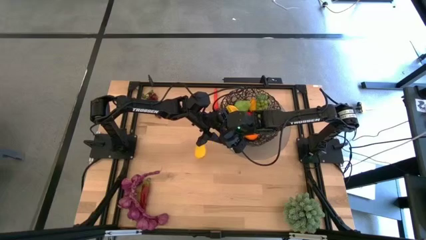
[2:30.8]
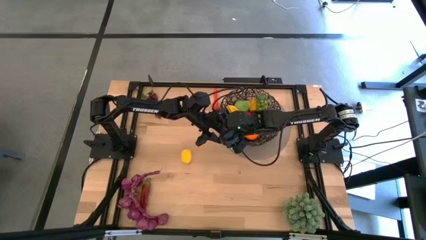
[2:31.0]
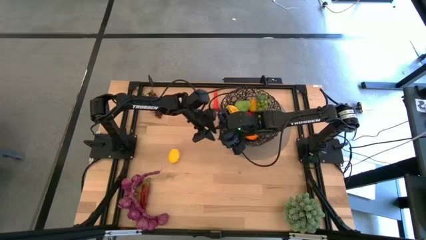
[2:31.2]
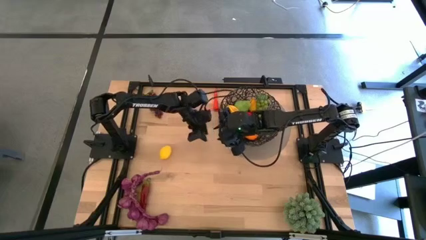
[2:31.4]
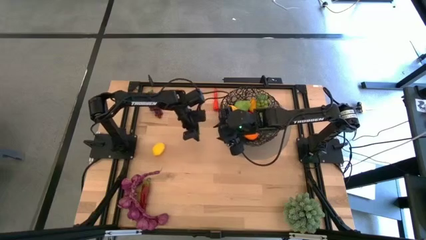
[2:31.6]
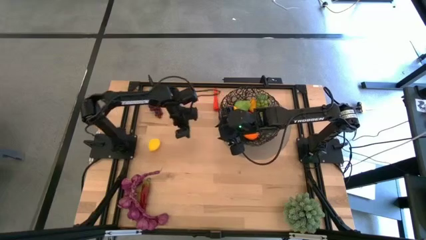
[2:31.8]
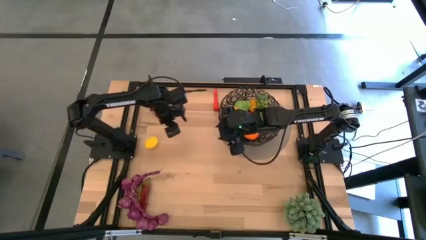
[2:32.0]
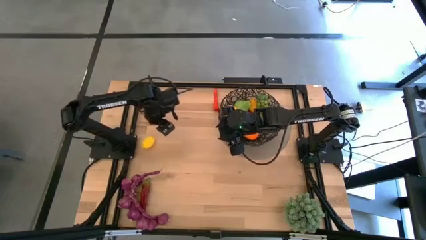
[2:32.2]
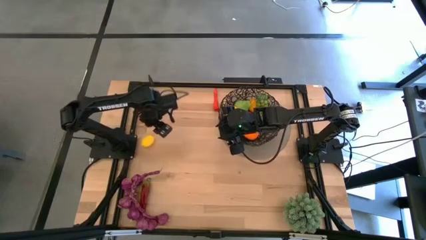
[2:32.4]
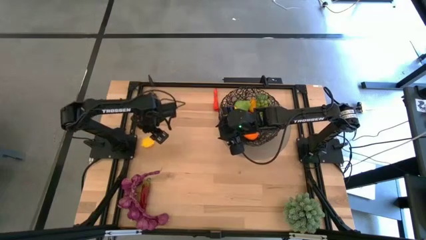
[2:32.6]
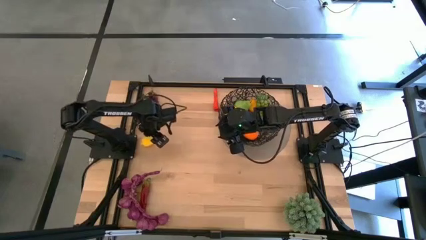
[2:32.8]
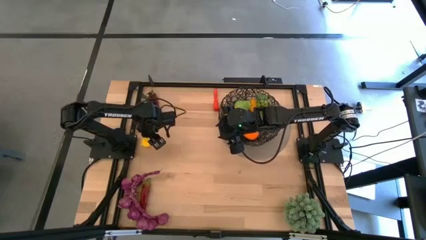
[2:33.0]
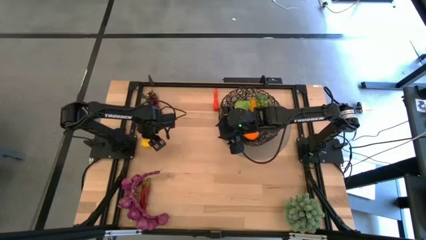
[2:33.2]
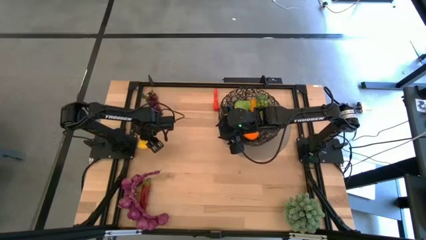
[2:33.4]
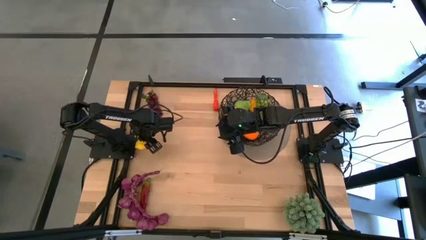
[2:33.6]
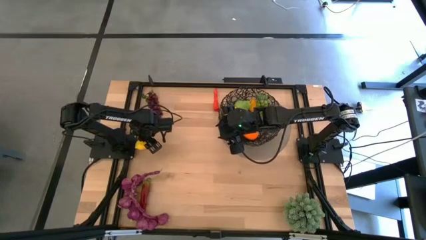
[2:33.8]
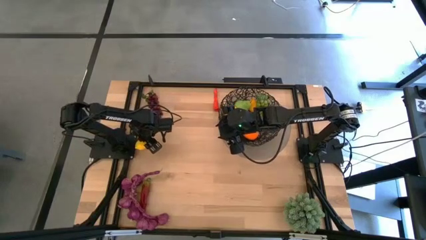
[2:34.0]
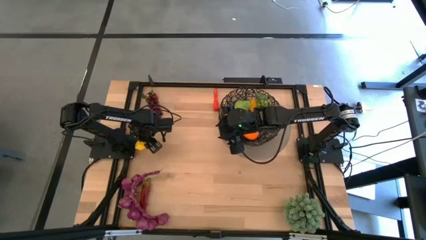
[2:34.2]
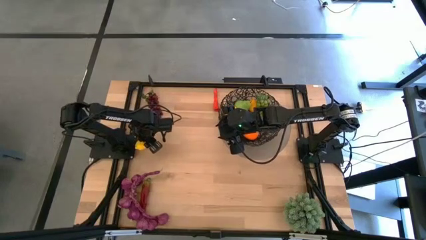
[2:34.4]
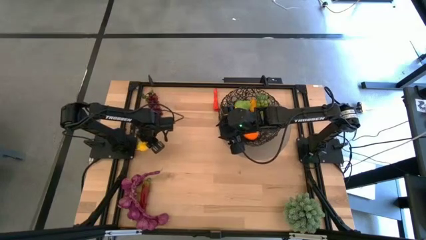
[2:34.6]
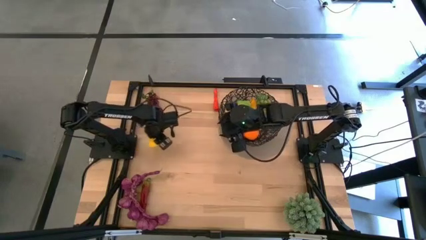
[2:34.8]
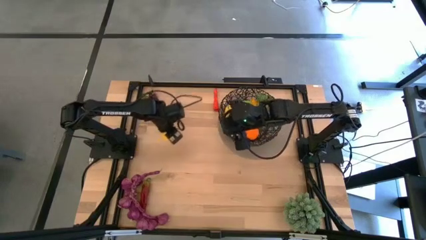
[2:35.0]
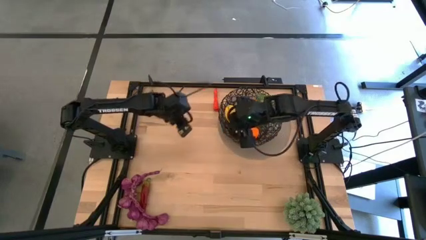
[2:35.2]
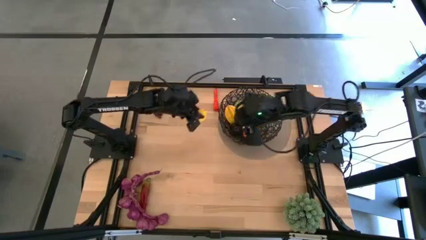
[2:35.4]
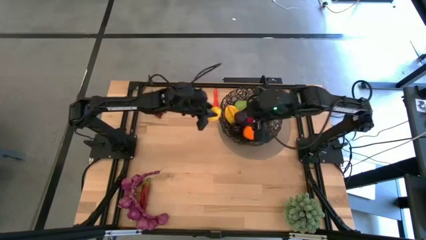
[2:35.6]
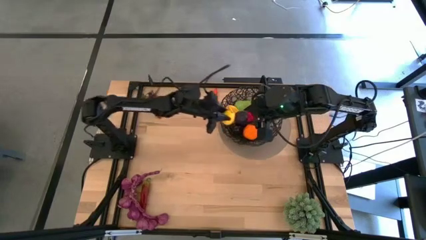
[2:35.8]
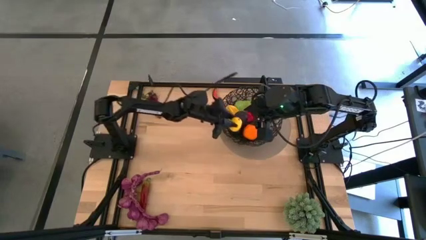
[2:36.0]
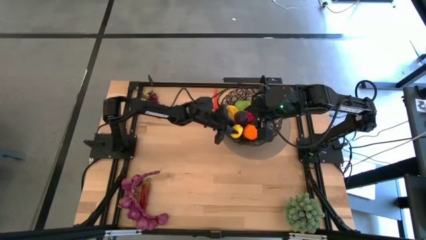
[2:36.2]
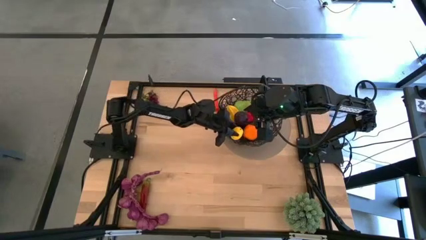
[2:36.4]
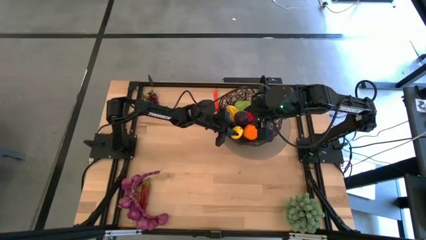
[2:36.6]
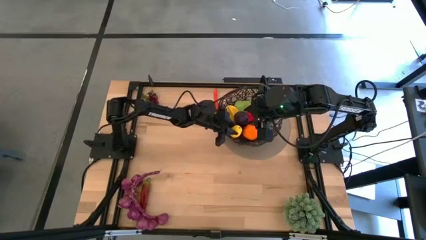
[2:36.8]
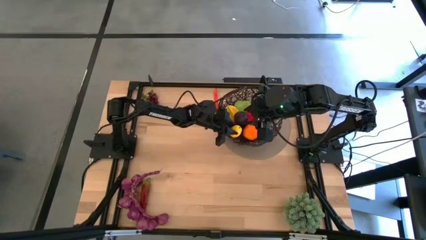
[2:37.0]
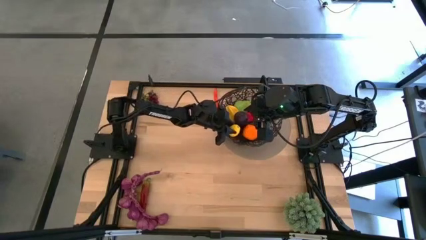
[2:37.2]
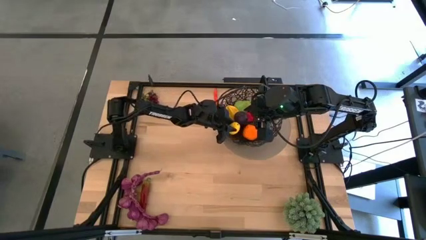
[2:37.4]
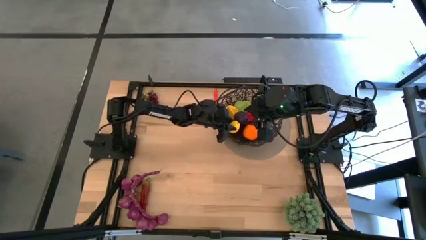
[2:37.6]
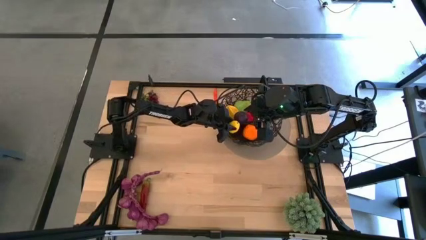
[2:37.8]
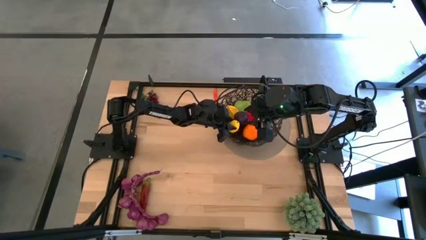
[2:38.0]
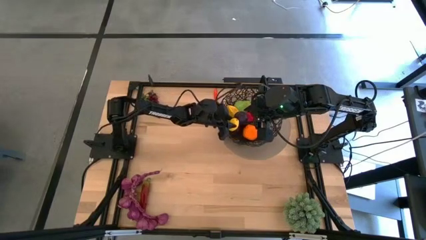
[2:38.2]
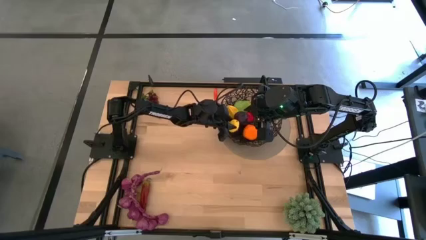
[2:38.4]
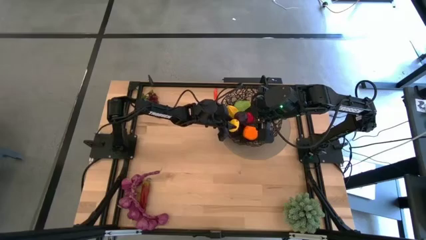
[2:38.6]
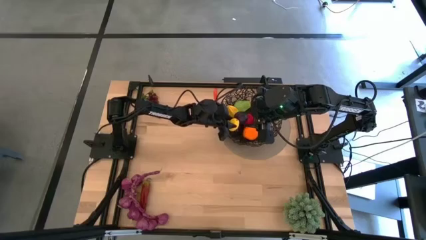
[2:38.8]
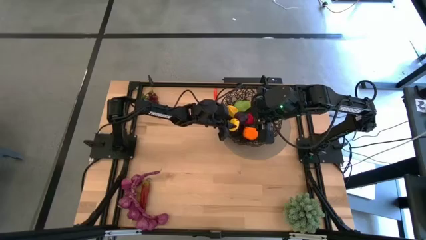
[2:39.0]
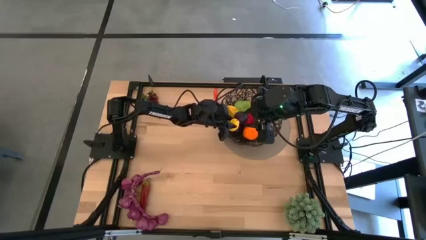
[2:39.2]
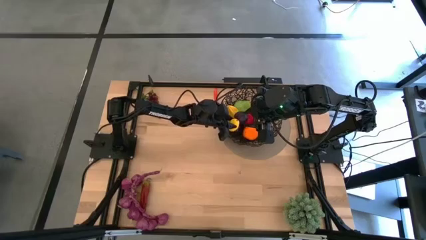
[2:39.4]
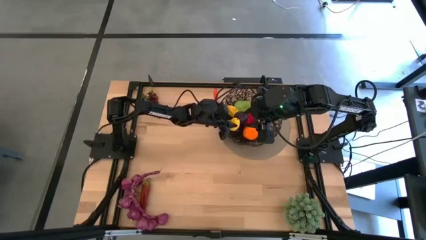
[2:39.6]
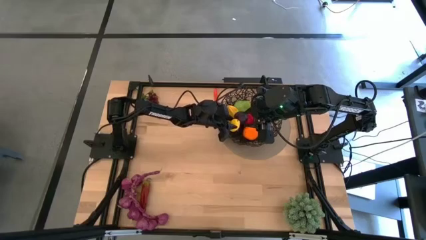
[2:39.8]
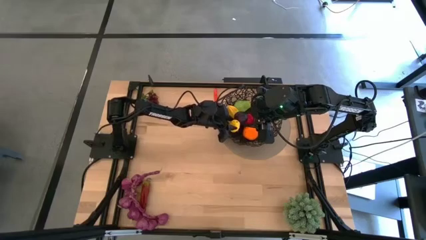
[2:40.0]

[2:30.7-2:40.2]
Task: Build produce basket
Put the lemon into the black wire basket

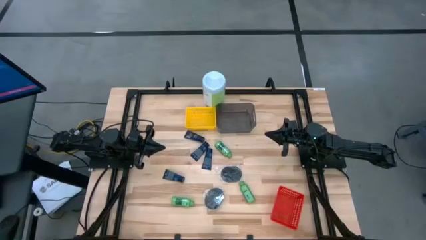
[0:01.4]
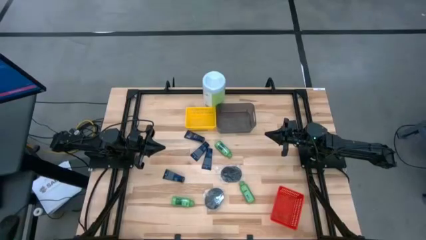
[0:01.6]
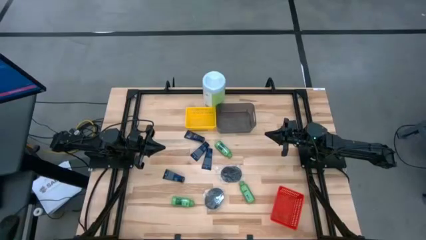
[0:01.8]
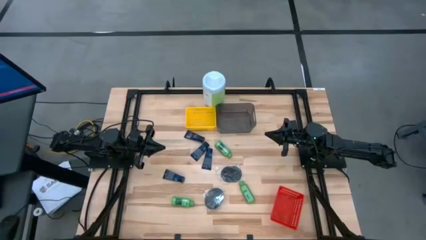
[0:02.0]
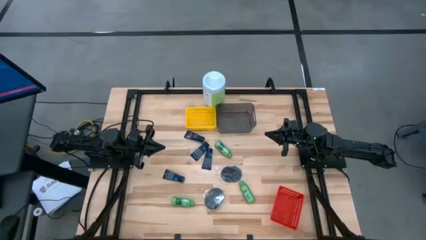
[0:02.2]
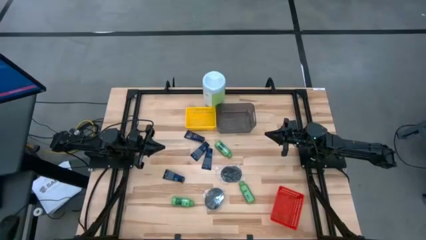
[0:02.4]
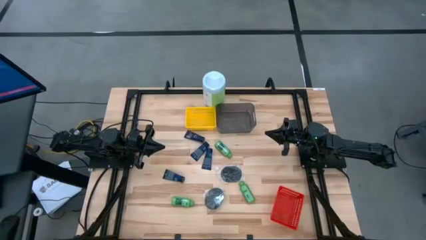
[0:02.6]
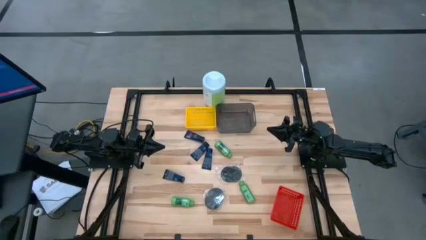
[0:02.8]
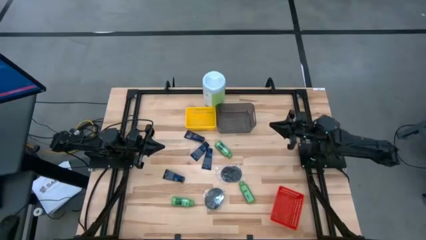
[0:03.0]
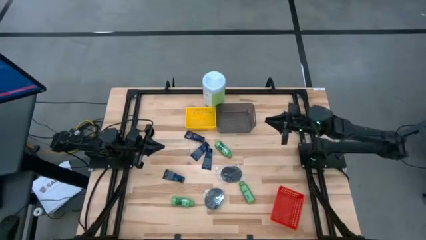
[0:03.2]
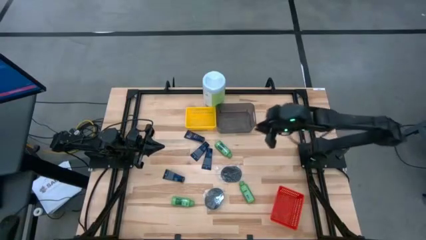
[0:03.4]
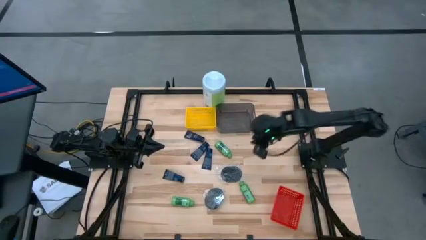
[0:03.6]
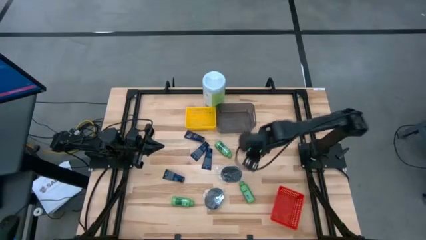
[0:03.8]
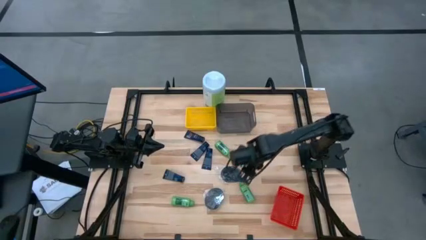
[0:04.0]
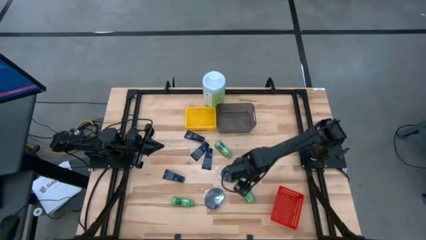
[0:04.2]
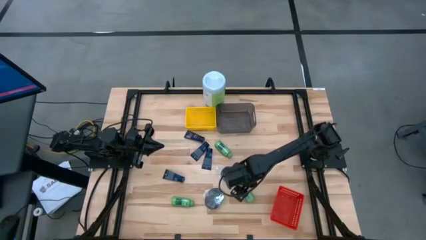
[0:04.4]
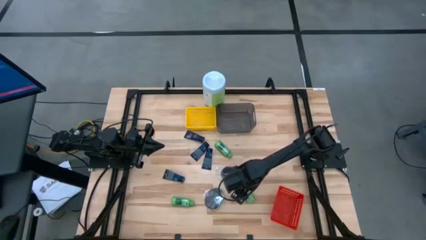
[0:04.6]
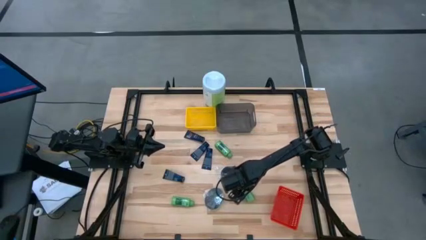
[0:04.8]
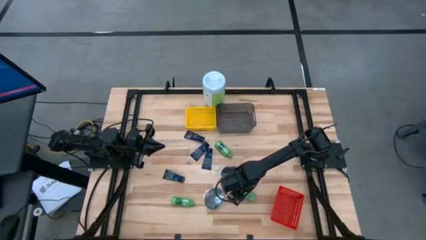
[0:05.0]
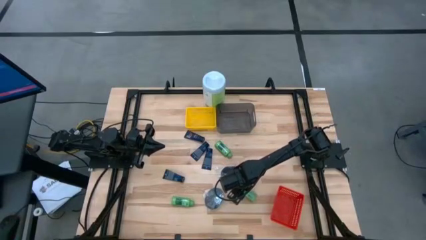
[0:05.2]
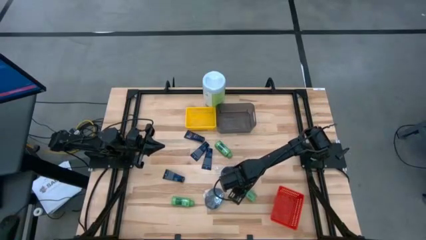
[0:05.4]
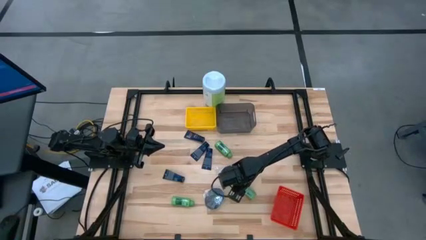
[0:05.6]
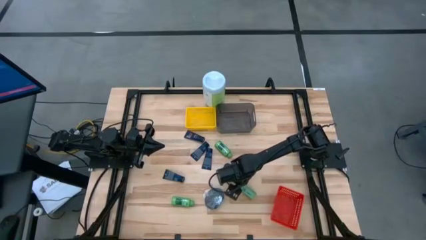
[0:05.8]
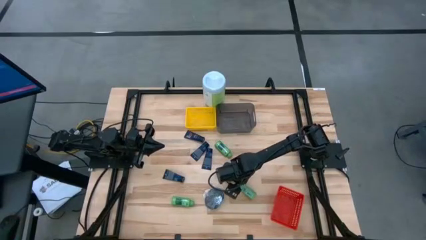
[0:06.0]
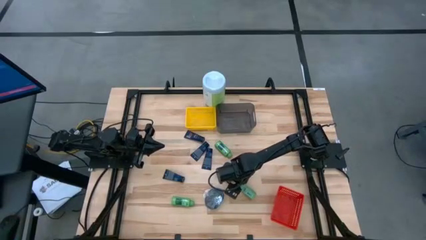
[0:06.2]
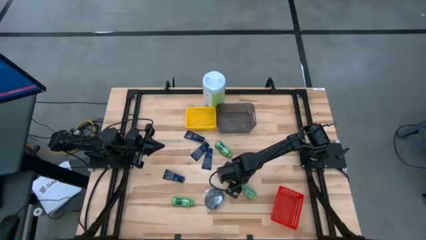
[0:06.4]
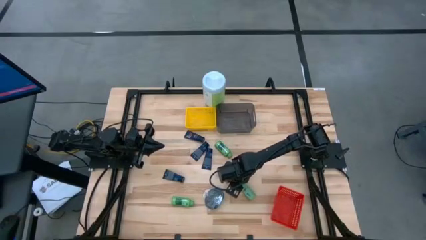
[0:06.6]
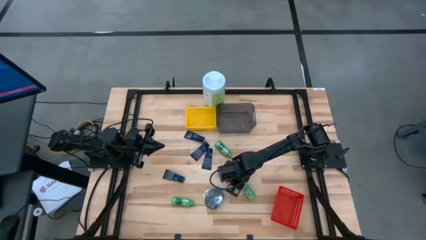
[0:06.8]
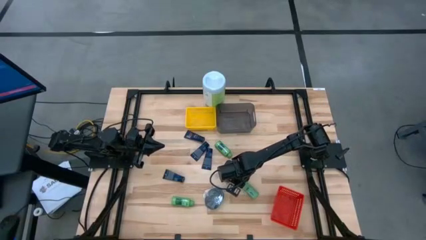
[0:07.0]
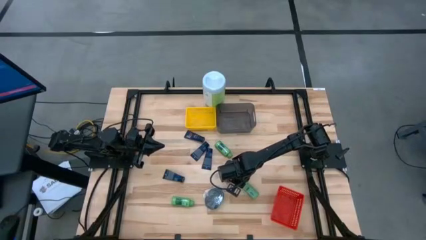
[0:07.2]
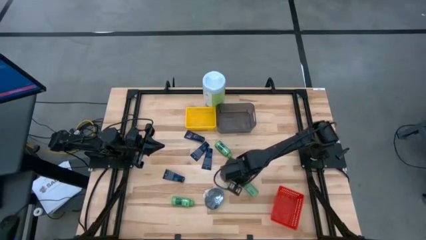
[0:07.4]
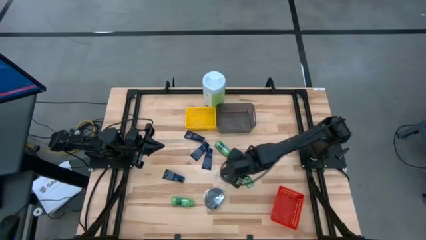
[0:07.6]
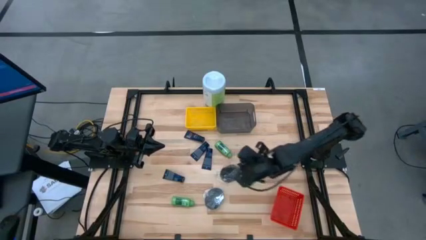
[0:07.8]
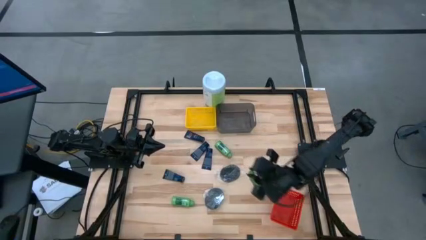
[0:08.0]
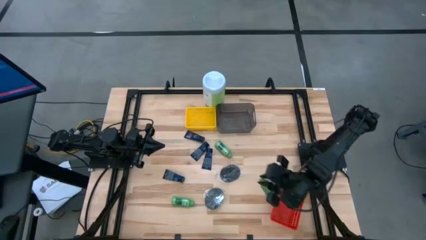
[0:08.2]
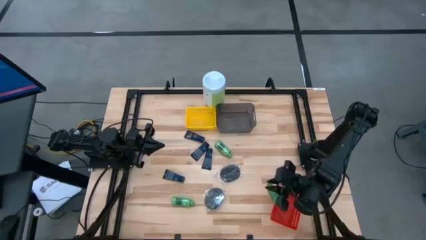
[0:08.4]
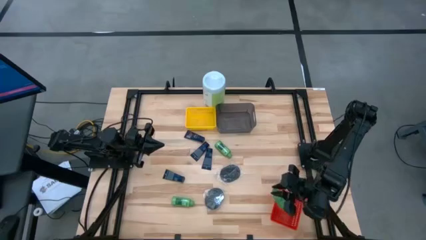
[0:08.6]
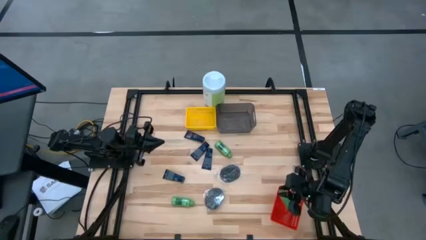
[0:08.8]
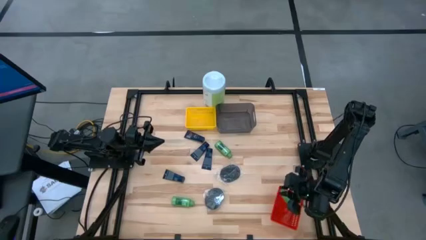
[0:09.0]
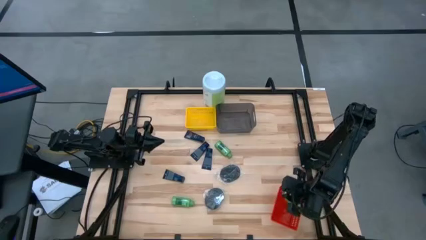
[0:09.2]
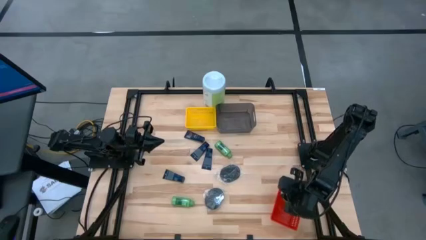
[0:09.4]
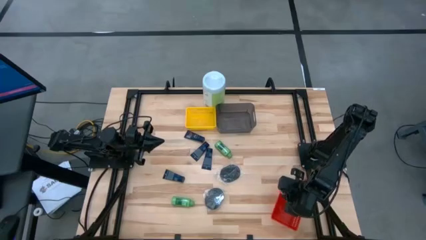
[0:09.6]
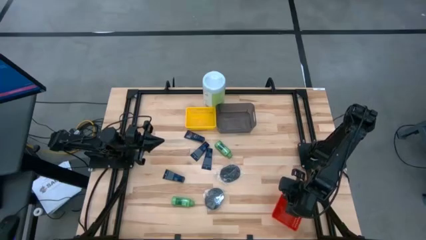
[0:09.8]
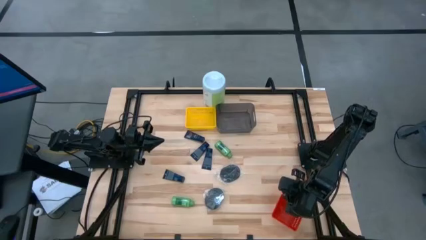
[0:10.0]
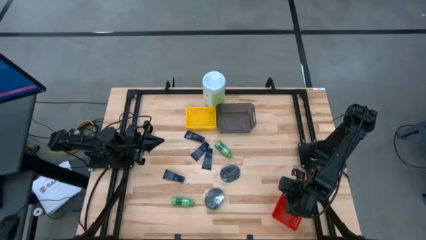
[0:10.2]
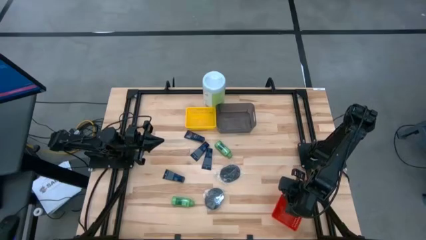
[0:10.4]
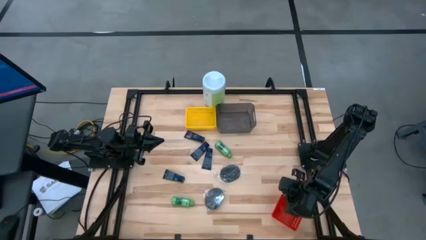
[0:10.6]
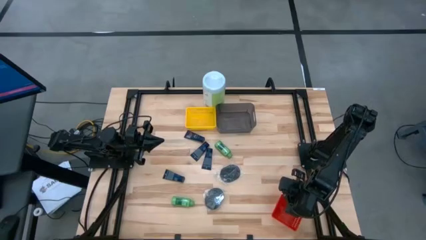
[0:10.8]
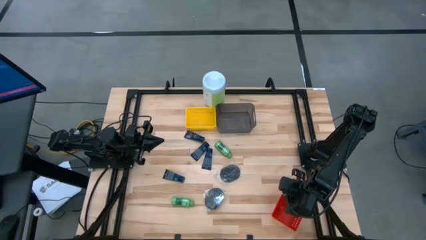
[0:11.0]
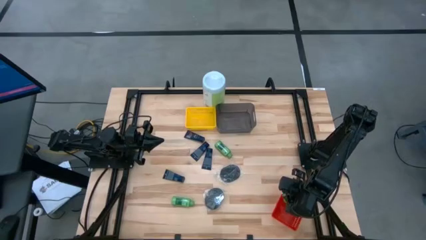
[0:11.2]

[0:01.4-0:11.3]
Task: Pick & Place Travel size toiletries
Put the green shampoo bottle into the red basket
